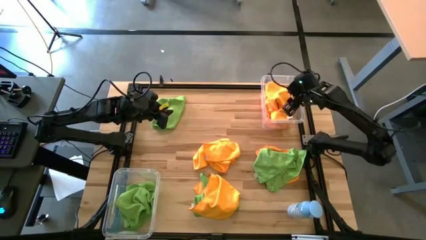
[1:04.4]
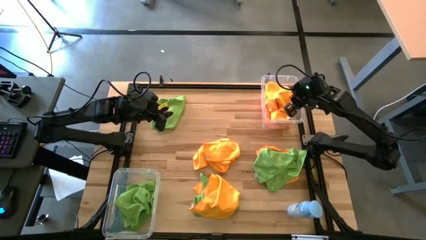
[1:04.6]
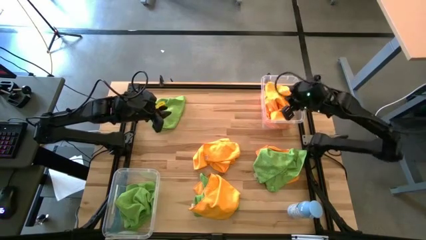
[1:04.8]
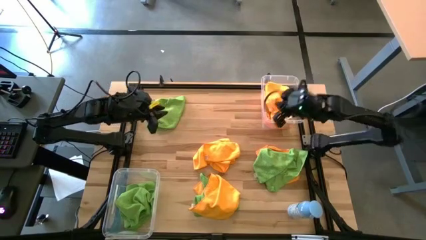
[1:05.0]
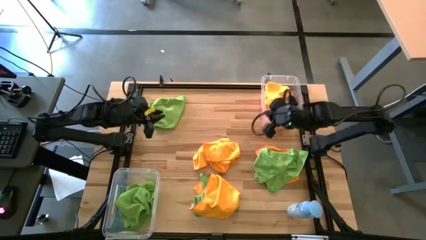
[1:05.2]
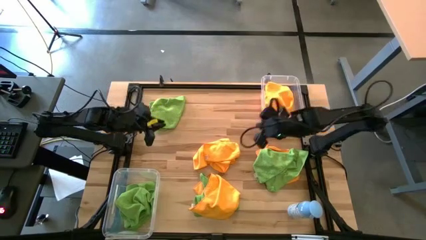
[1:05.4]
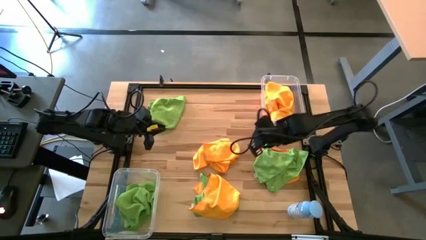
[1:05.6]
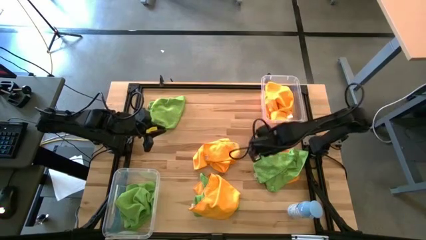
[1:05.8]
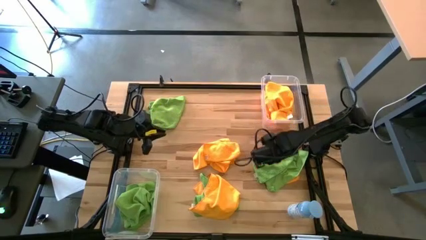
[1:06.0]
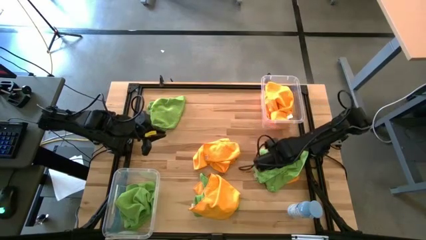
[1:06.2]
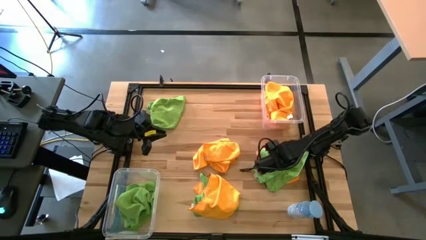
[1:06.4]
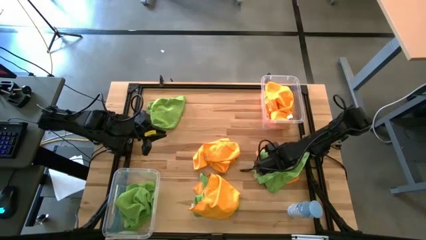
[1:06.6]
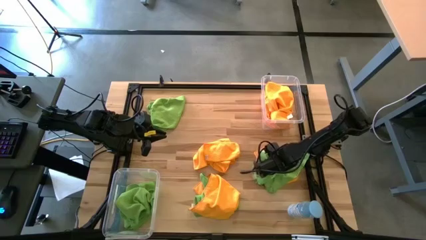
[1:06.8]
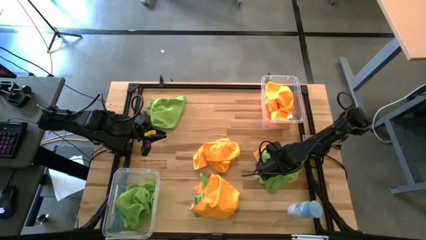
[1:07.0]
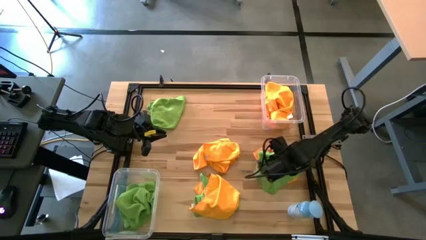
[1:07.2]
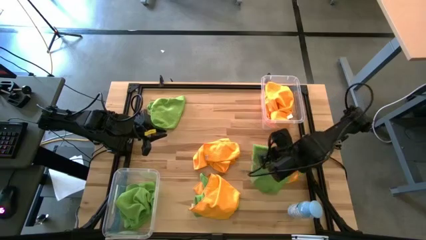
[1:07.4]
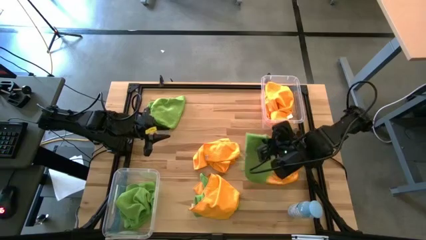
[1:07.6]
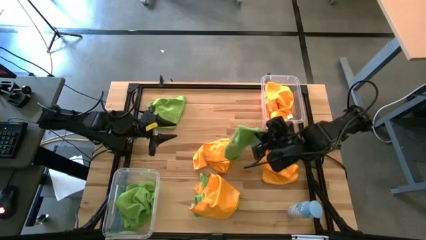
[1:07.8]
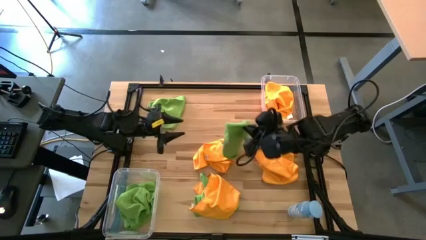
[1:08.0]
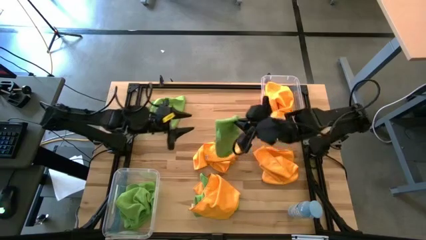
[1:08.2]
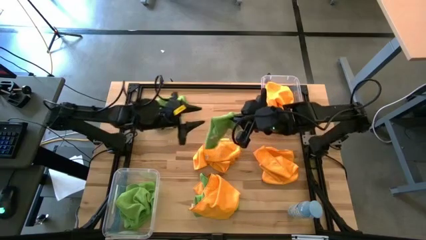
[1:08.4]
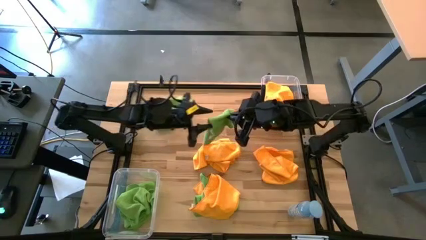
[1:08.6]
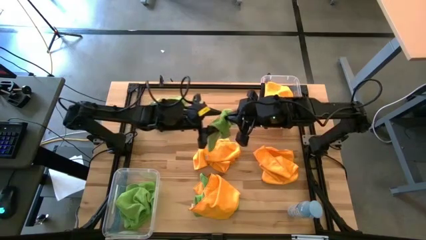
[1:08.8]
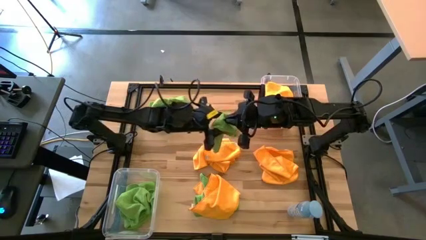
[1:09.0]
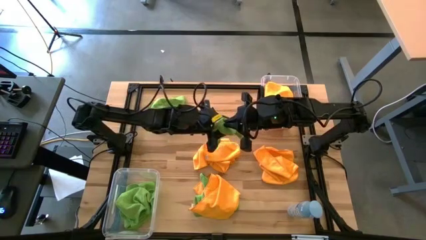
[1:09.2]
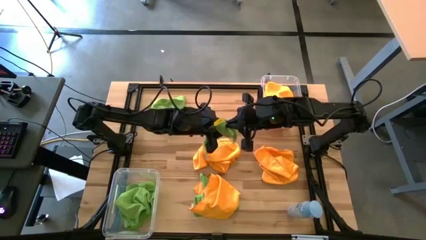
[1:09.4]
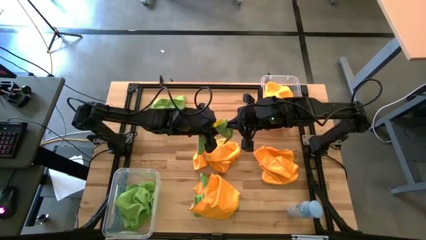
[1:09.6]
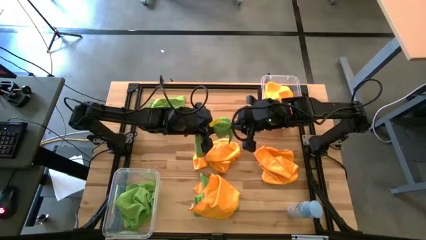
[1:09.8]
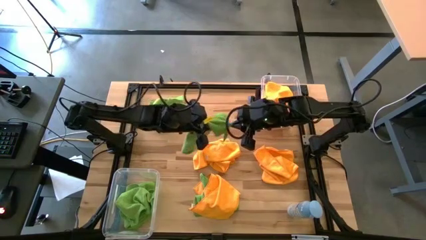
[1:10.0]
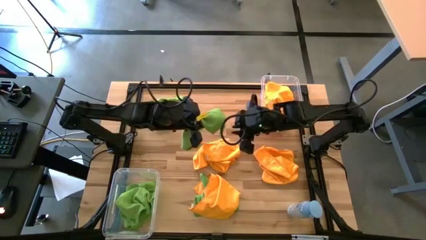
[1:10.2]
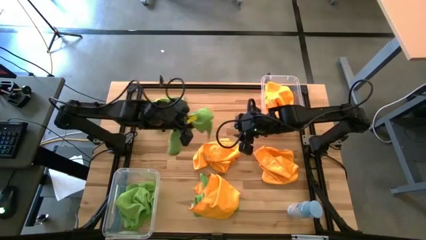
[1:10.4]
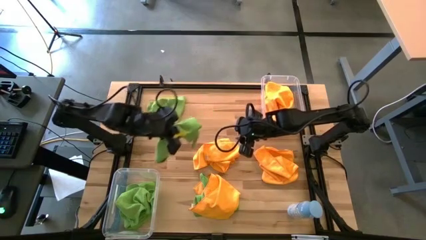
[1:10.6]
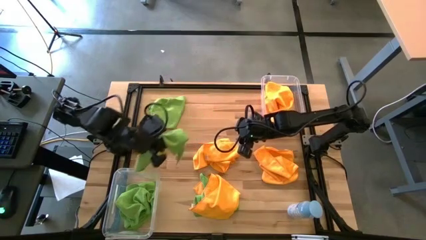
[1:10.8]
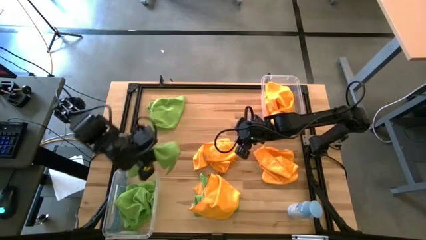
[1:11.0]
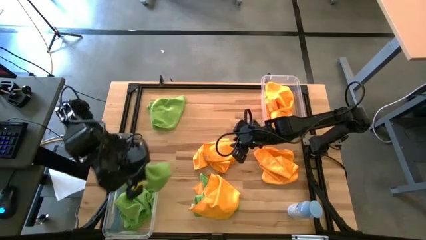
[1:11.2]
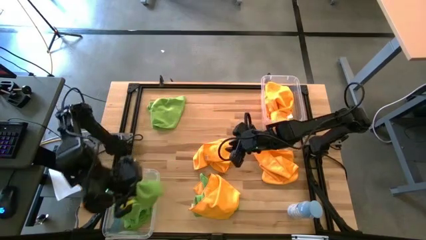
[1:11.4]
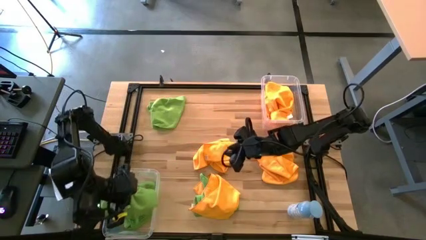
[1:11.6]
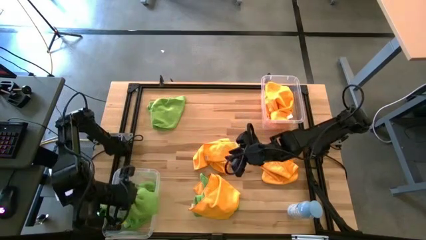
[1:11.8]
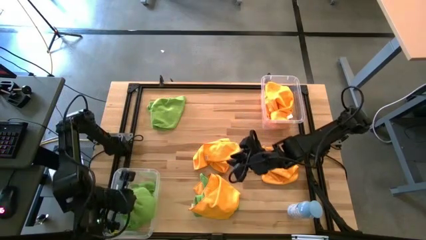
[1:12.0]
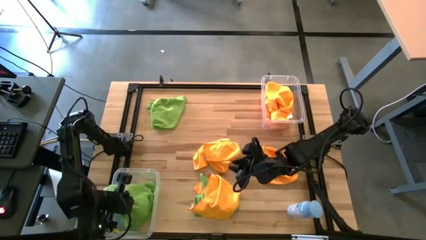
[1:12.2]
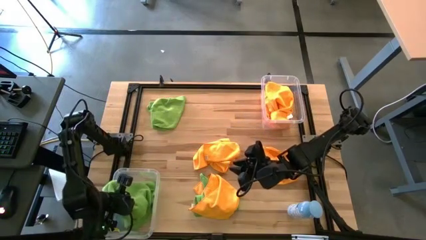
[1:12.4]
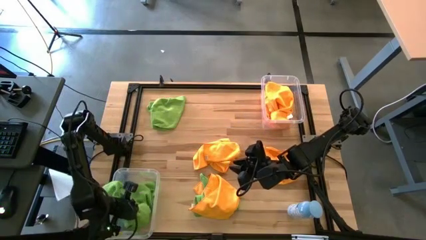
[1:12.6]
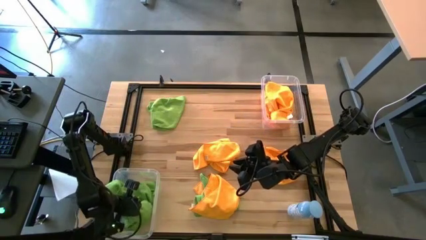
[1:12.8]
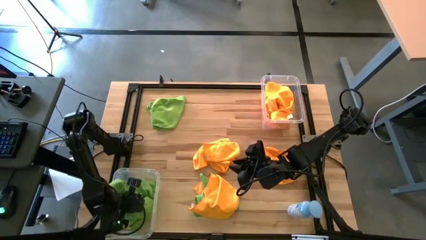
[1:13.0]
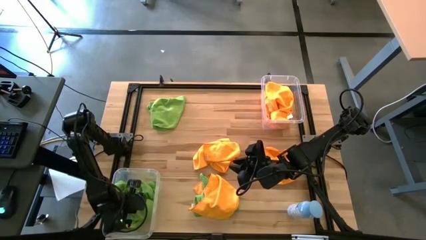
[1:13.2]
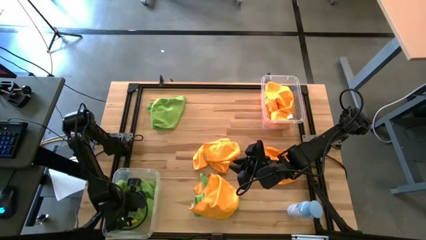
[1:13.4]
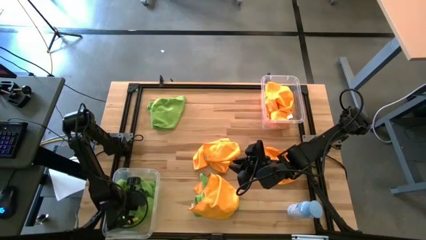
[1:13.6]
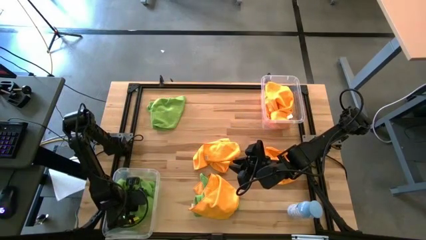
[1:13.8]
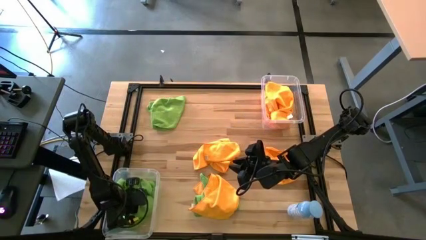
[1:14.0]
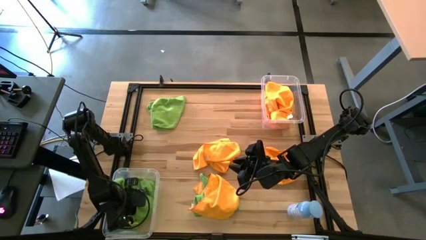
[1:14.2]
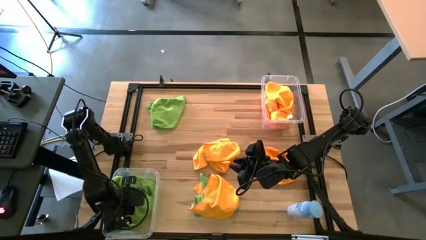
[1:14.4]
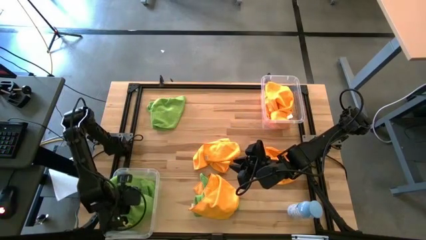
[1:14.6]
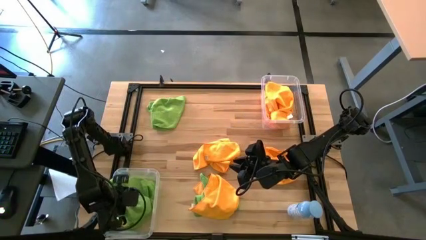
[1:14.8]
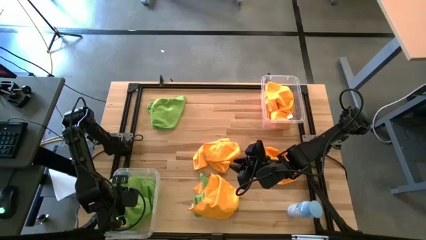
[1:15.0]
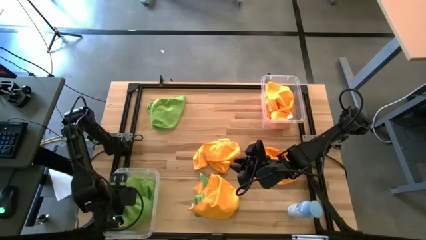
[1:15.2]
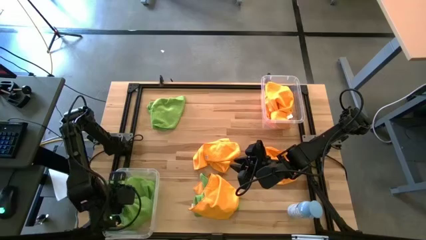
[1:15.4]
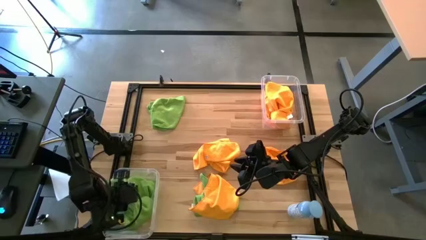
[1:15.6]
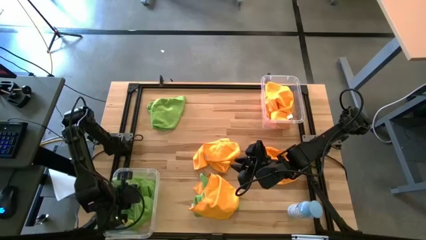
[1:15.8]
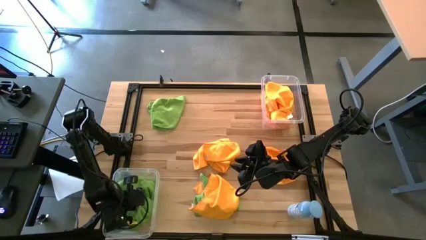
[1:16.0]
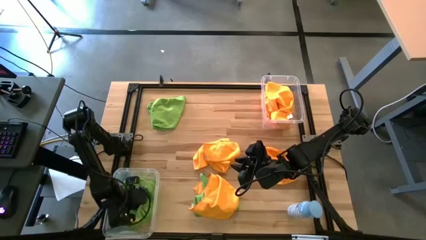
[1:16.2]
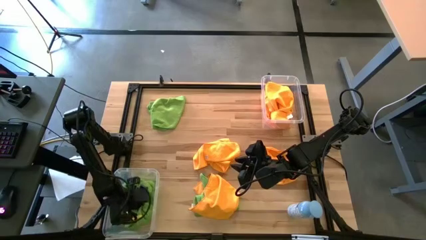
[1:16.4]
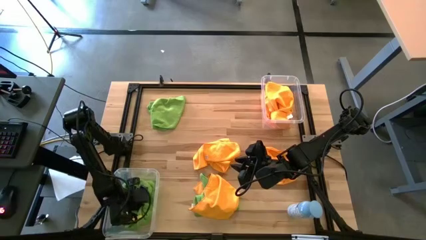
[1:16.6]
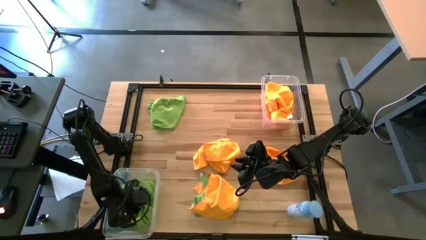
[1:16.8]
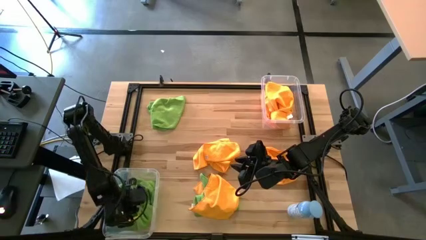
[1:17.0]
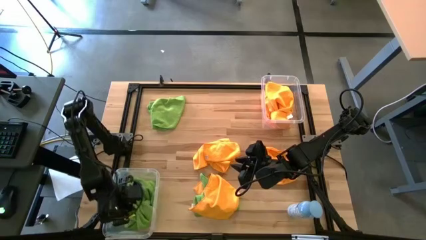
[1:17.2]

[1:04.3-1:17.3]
Task: Sort microfiber towel by color & place in baskets
Put the green microfiber towel into the bottom transparent bin

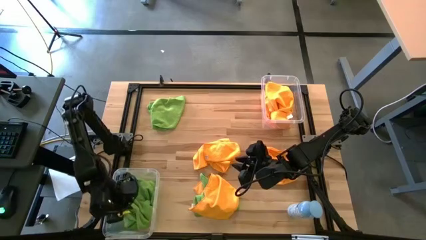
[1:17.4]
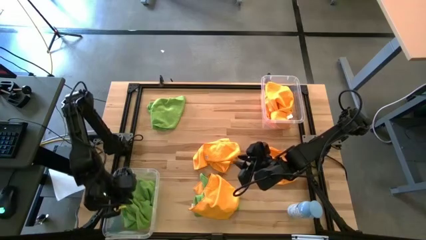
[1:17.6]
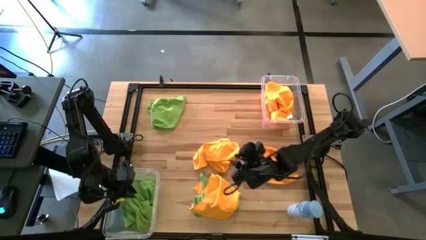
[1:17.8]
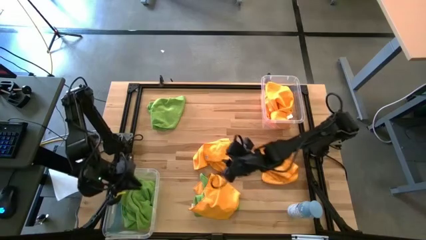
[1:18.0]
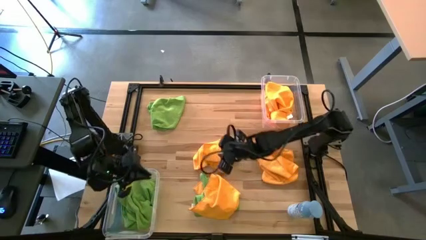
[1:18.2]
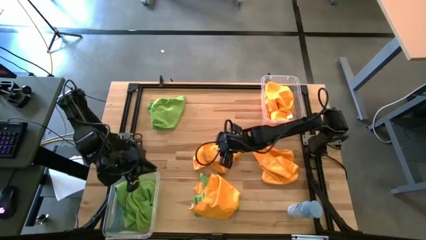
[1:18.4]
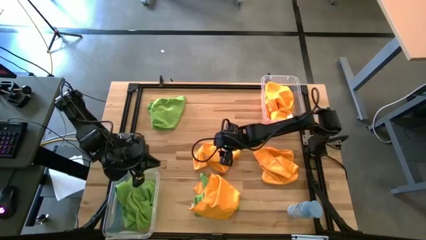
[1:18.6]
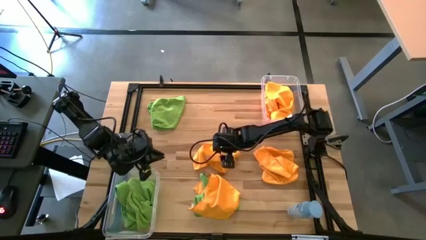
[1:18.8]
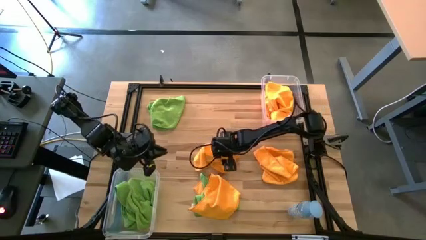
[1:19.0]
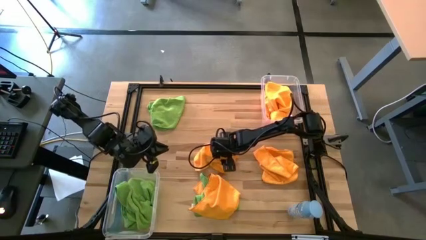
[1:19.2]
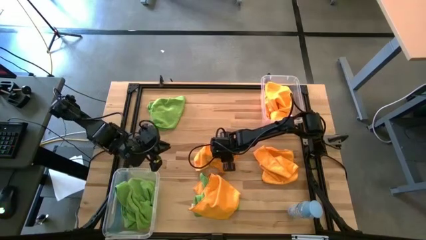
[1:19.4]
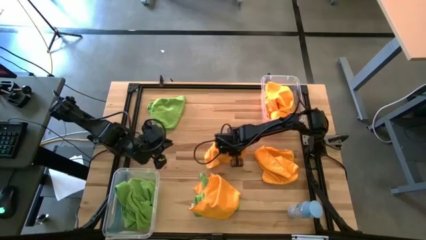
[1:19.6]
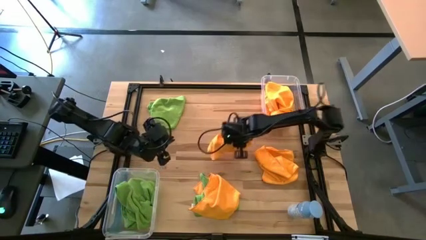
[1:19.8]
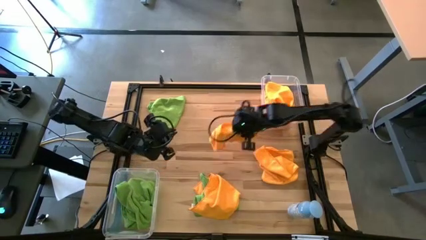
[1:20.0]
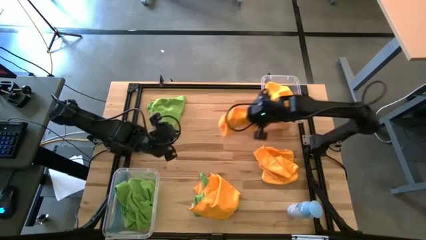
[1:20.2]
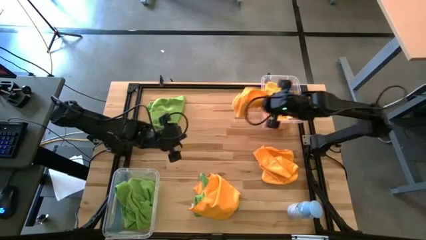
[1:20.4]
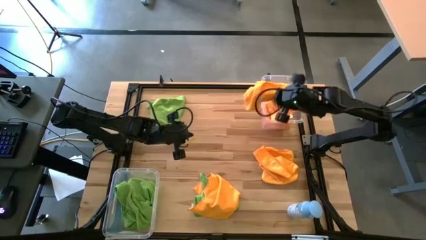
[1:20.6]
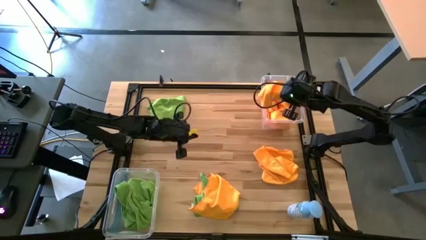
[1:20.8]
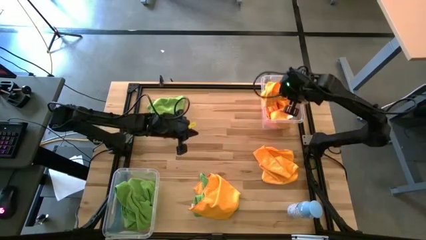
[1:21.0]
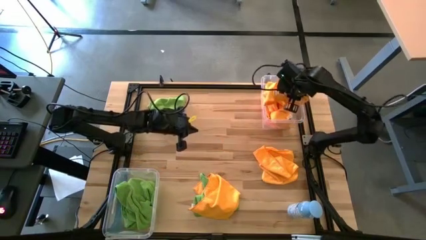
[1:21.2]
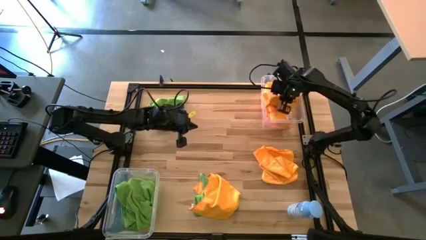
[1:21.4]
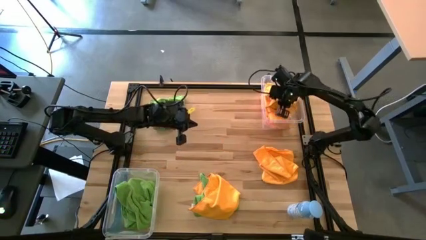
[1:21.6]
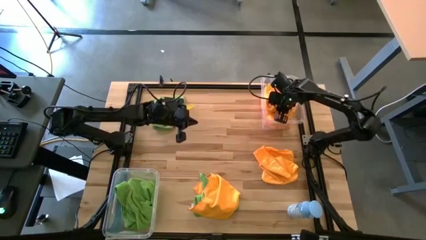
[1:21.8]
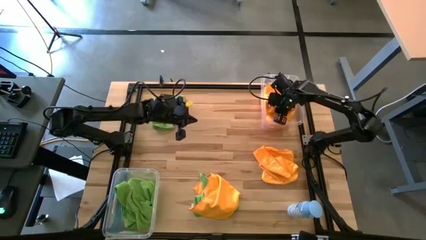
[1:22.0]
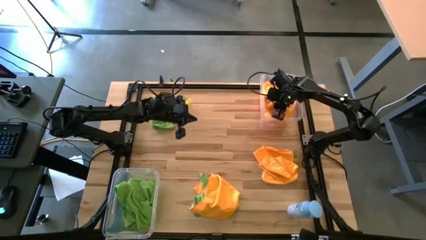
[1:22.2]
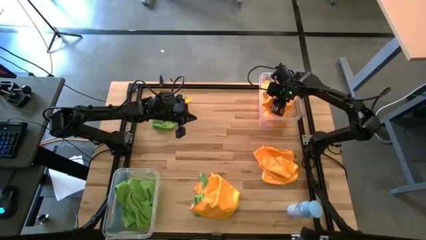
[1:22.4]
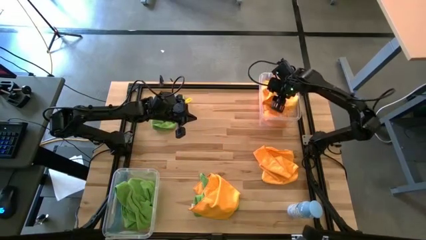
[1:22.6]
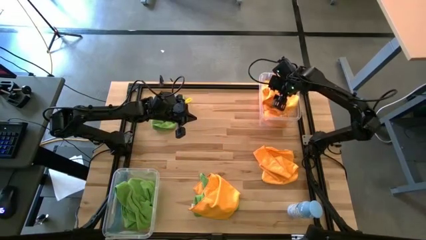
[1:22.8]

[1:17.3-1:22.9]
Put the orange microfiber towel into the top transparent bin
